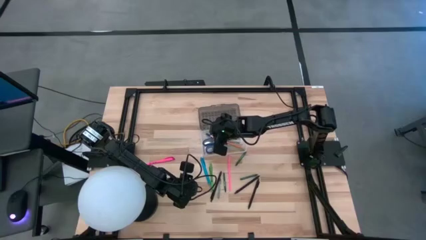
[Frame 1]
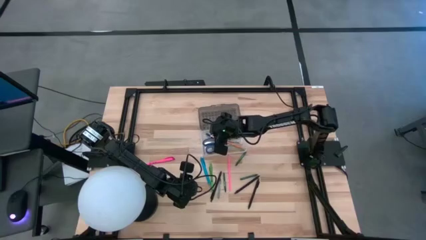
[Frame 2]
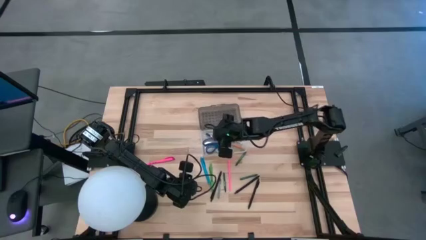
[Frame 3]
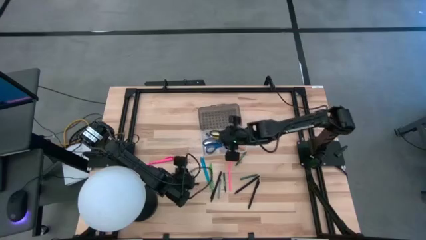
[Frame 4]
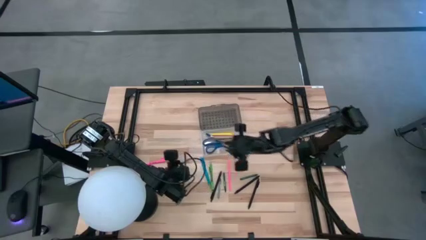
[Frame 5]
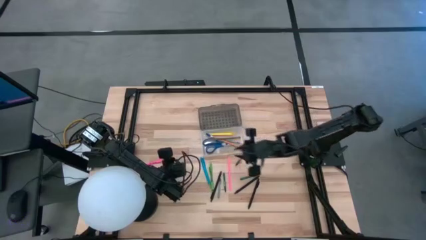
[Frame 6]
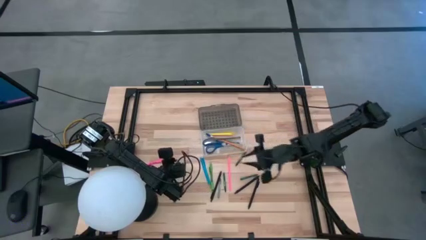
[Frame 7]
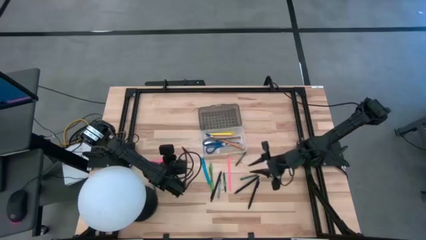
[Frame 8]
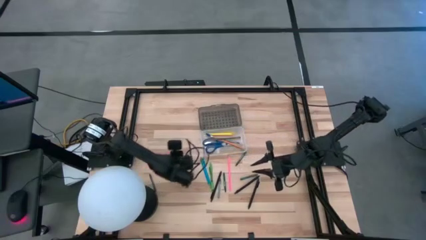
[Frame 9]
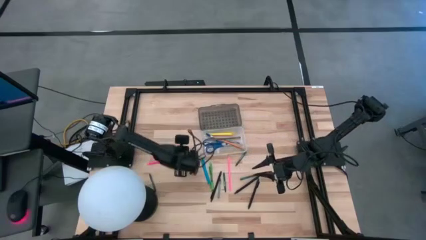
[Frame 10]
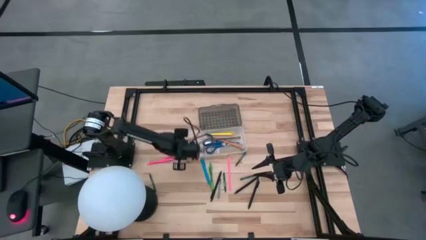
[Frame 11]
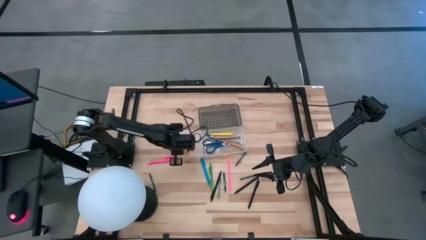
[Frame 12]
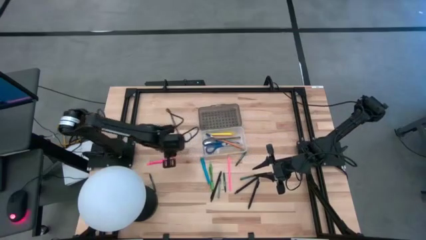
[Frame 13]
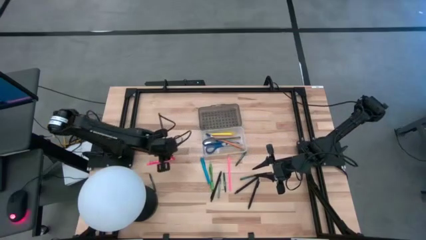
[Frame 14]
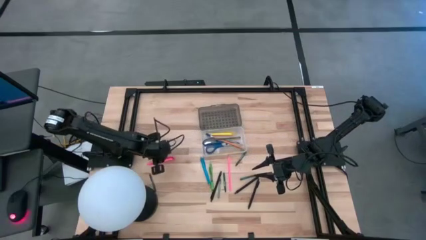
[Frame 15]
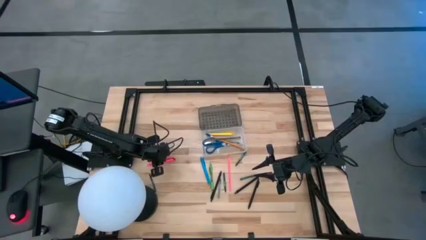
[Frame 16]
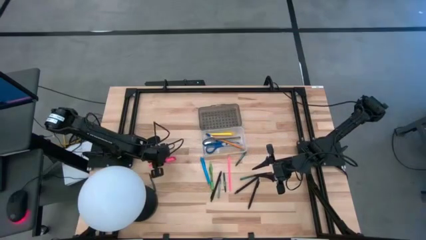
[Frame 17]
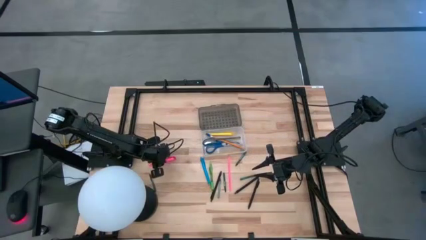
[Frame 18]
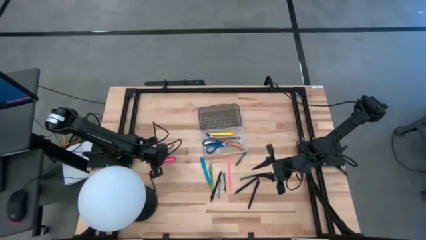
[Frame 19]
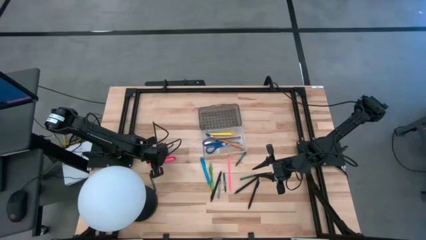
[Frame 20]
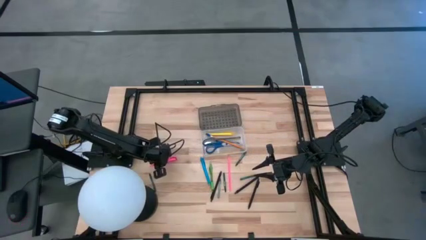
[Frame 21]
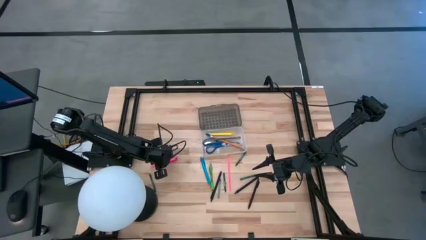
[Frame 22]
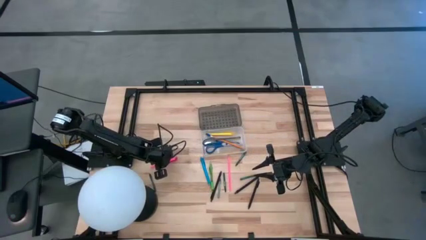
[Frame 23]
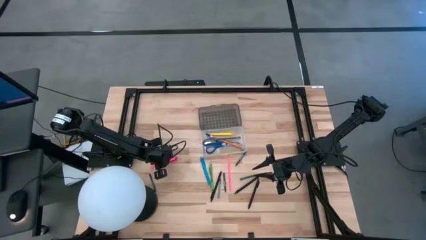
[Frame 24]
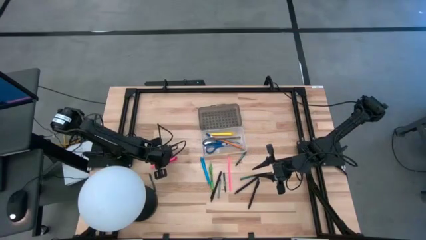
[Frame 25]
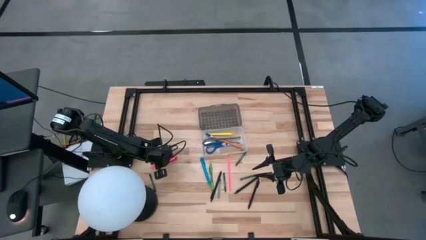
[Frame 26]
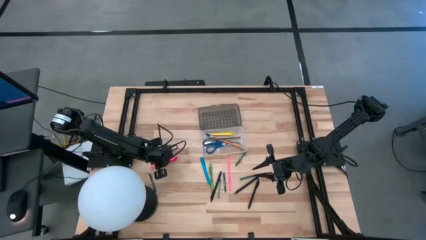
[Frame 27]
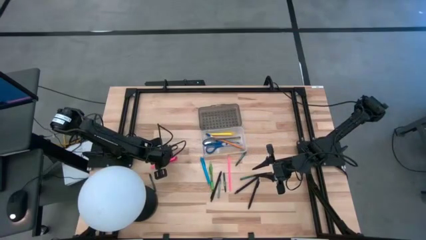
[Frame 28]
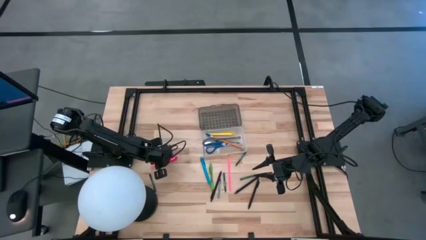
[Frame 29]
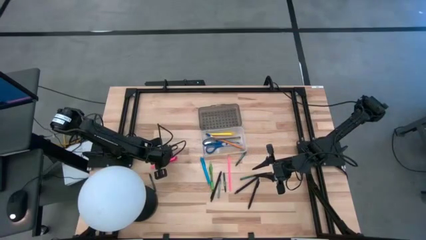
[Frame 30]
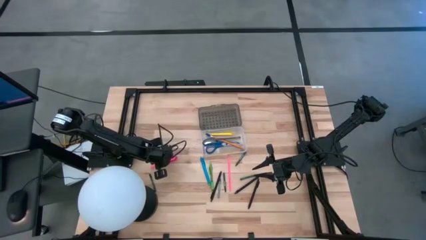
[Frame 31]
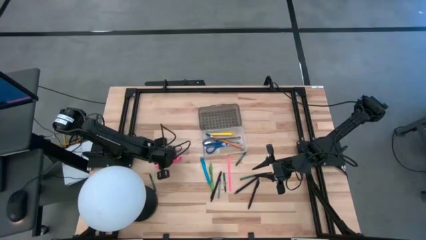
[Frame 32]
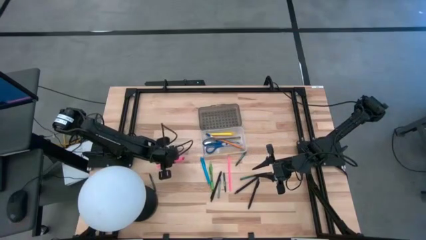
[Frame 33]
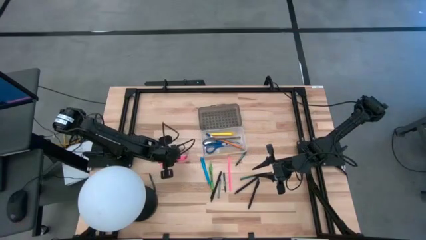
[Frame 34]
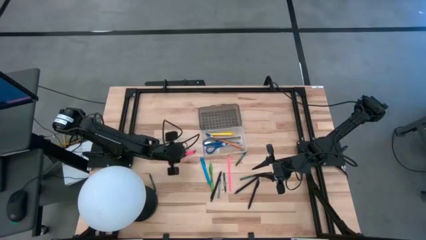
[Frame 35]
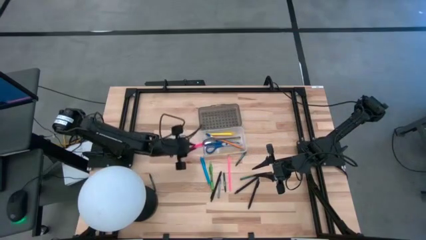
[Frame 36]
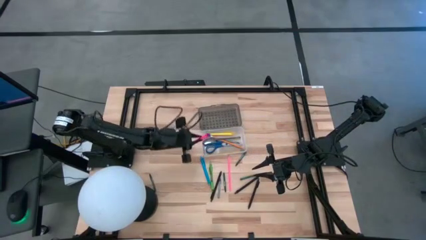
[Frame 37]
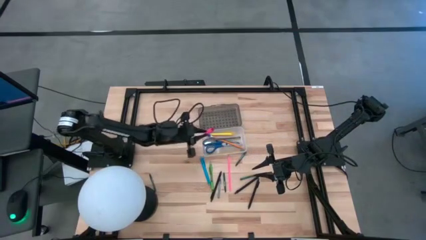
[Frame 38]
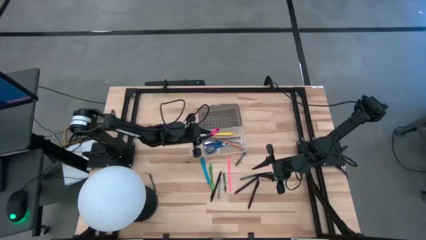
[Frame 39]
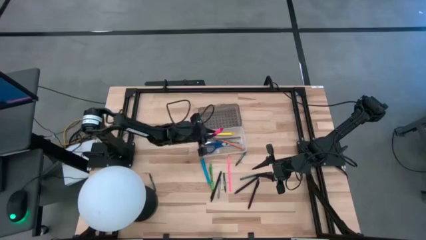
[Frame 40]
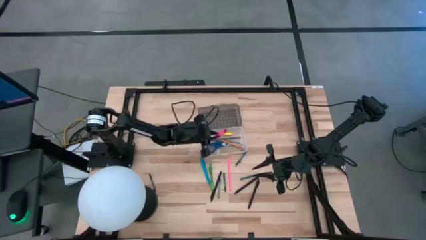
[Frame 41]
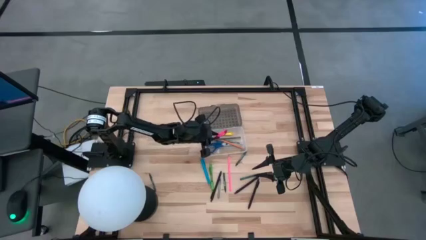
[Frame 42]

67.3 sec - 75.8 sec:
Task: Pick & place school supplies into a supply box
Put the pink pen into the supply box

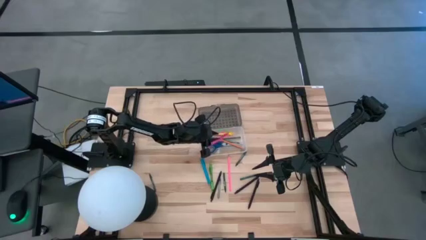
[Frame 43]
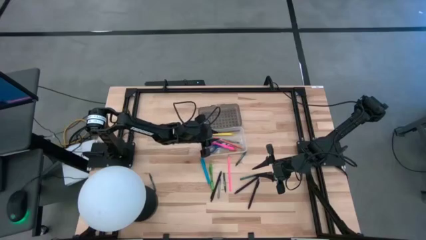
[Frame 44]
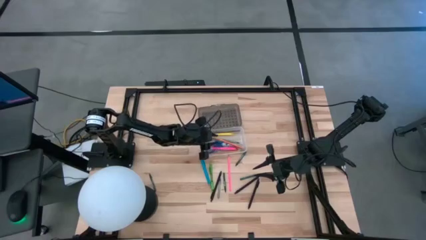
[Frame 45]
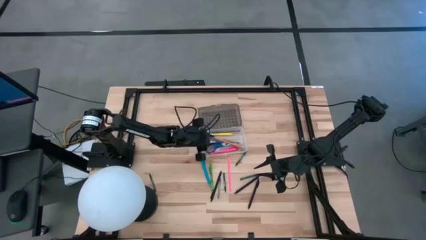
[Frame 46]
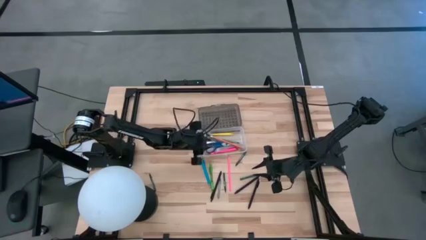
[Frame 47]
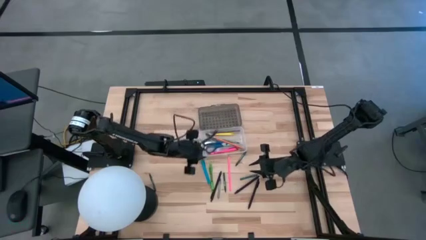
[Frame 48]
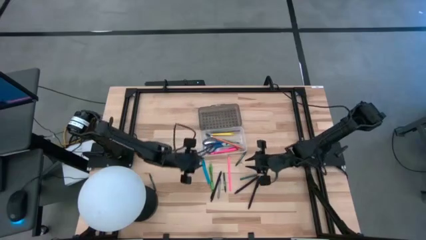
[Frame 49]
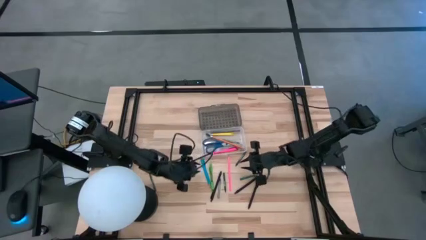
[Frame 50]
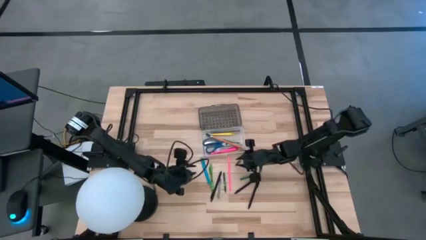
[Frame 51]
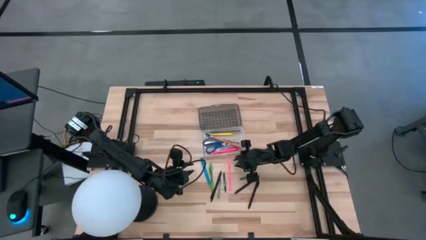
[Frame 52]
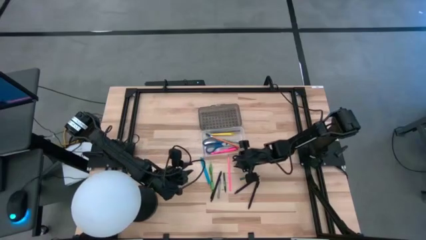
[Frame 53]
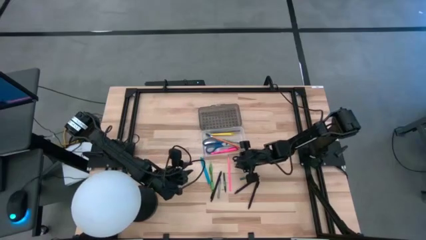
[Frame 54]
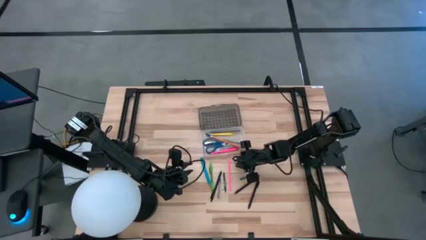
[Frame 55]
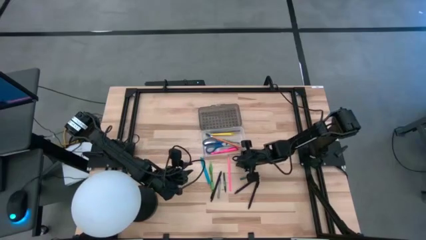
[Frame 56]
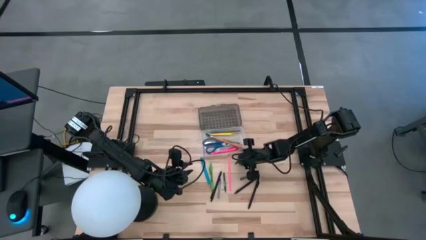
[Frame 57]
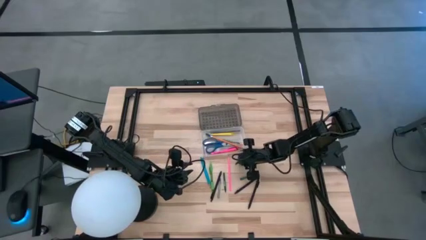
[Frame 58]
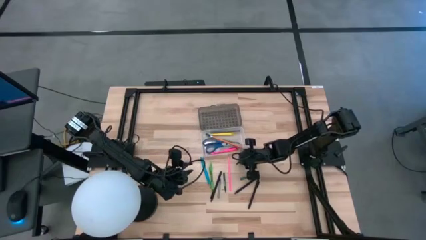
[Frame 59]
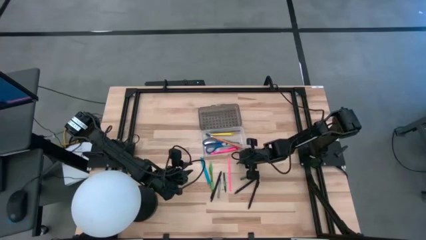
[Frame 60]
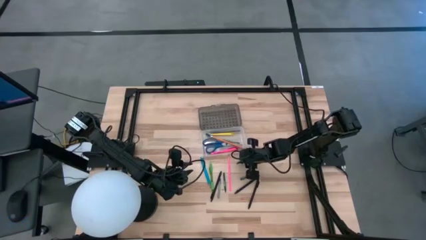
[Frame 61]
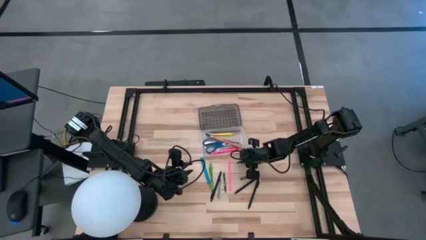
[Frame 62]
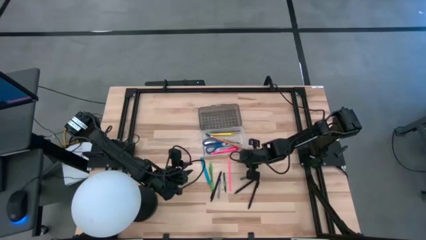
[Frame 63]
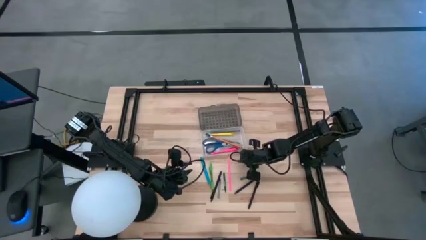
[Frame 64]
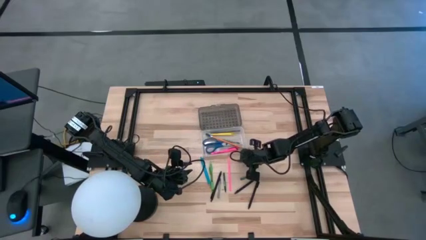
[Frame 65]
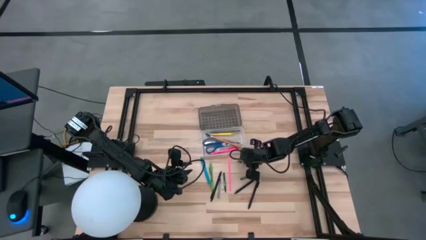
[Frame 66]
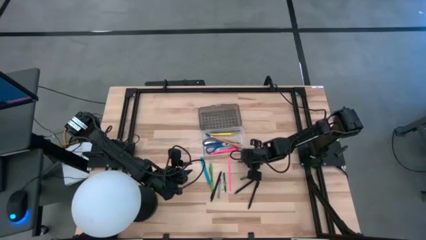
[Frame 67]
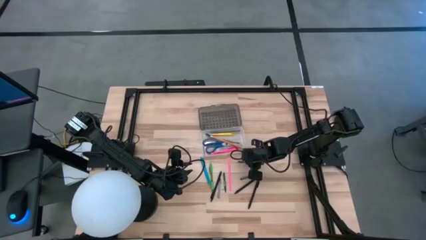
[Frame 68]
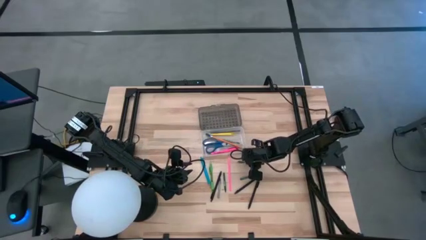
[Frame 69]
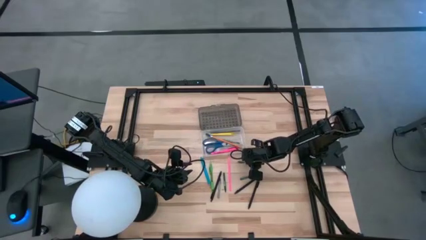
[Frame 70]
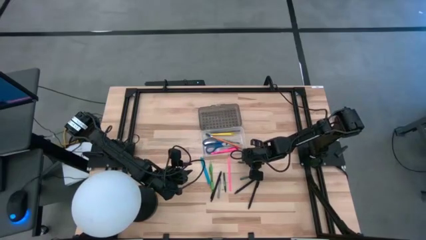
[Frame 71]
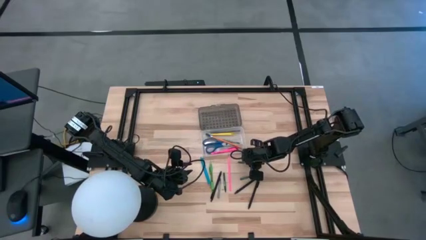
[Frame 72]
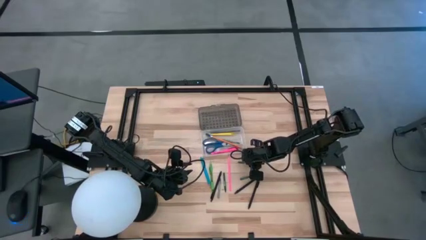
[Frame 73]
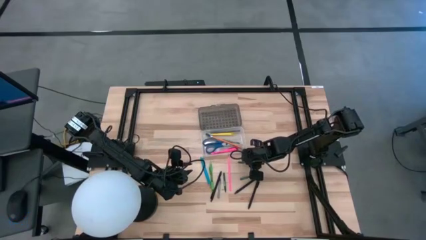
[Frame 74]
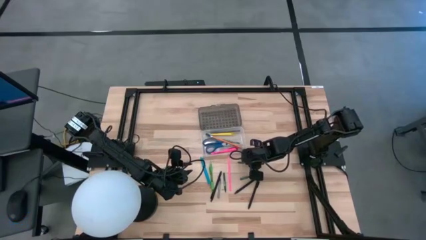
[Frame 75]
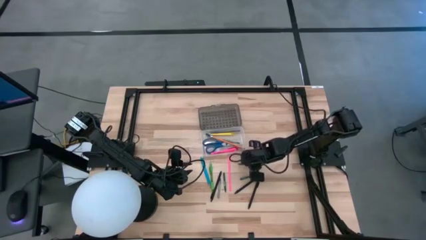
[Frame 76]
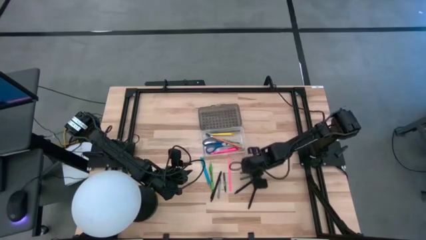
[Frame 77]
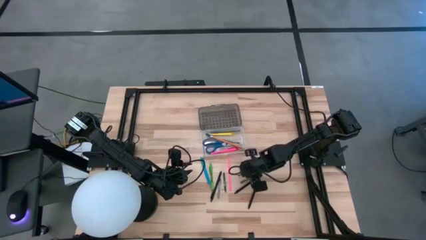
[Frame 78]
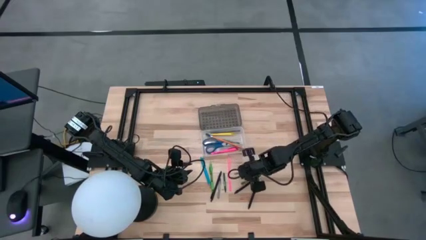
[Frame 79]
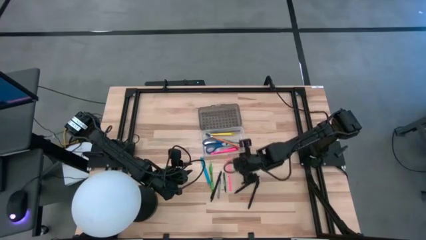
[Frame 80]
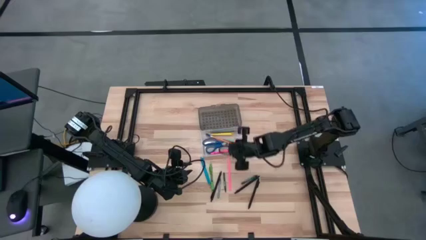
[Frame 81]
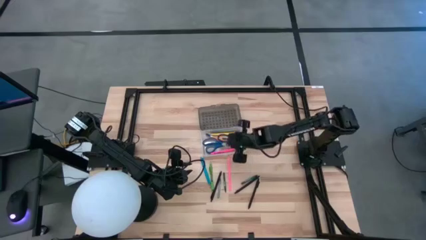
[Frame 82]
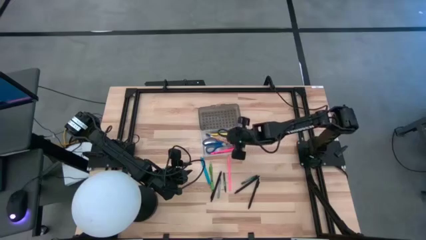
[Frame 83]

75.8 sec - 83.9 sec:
Put the green crayon into the supply box
